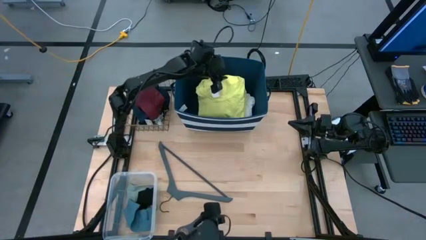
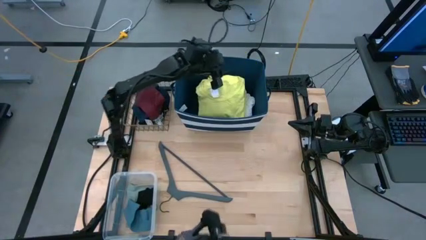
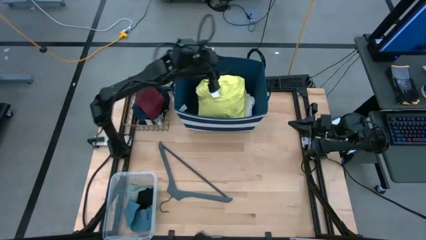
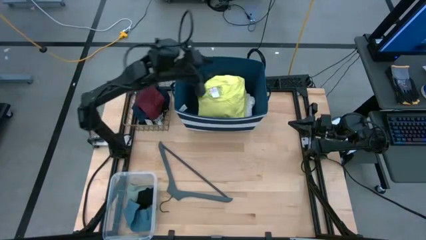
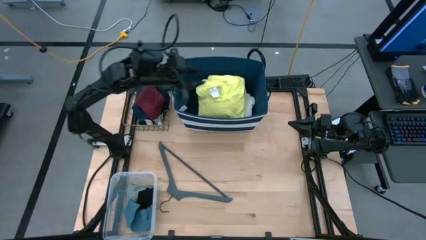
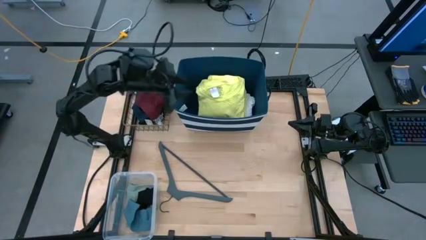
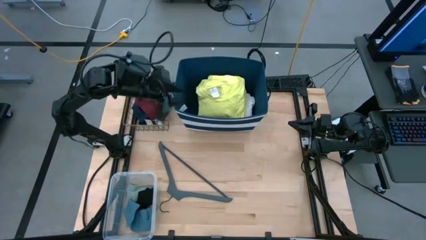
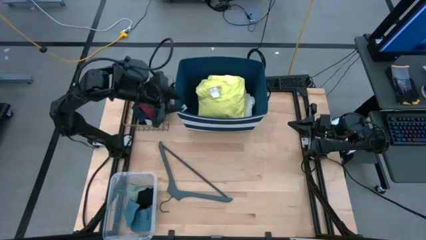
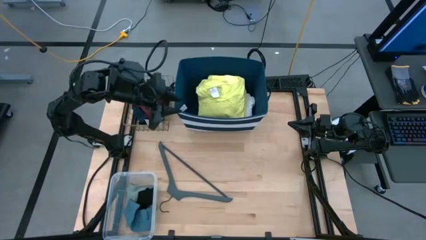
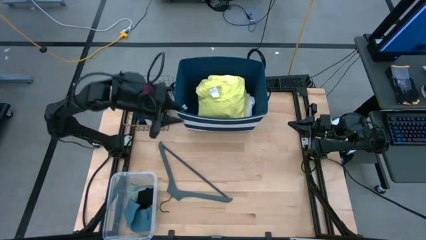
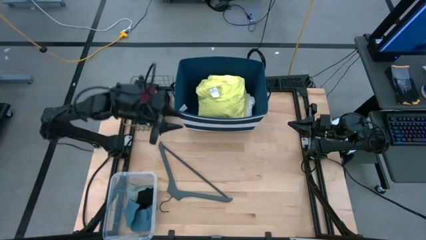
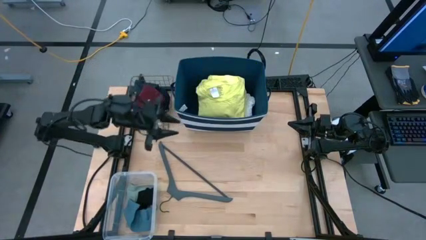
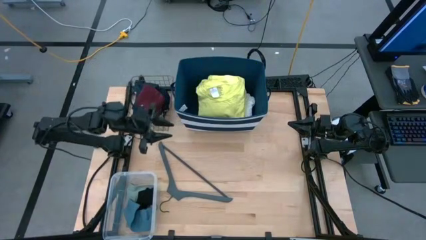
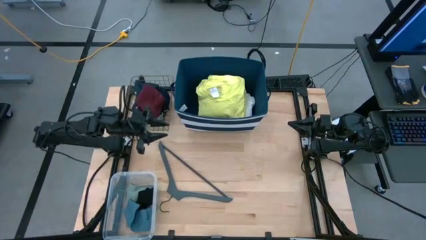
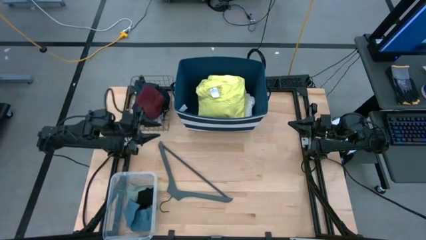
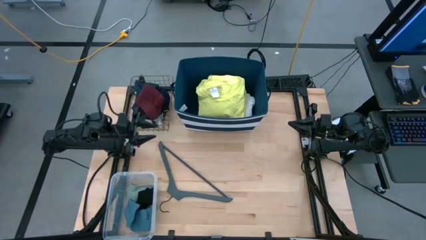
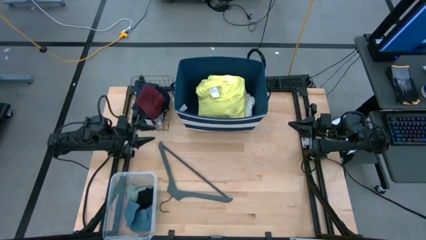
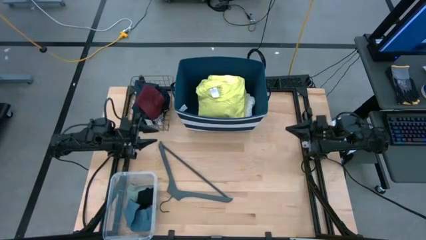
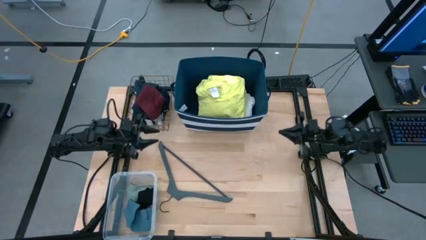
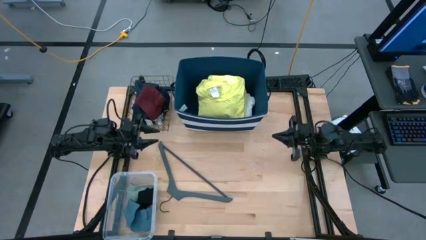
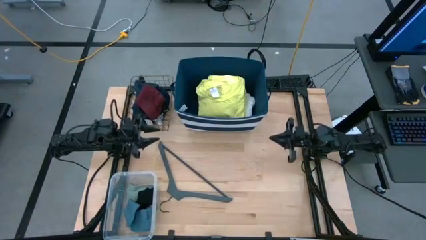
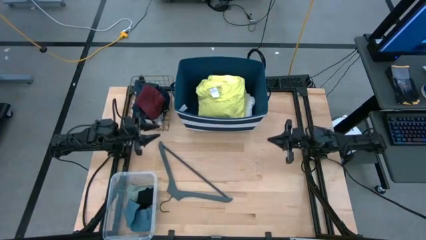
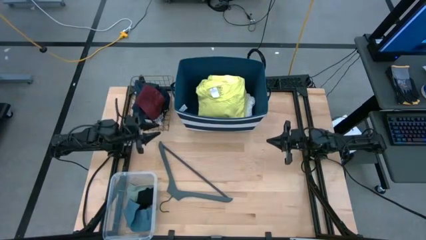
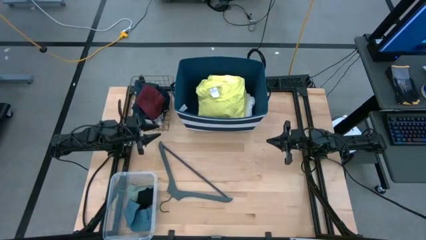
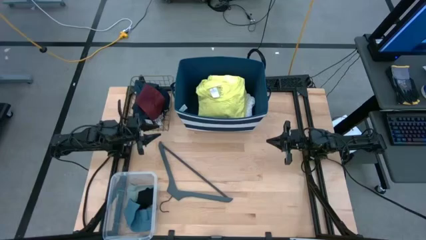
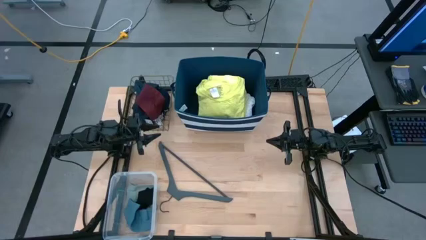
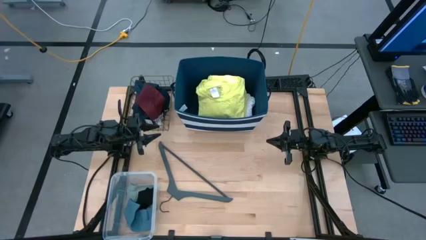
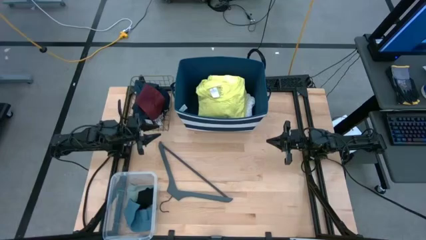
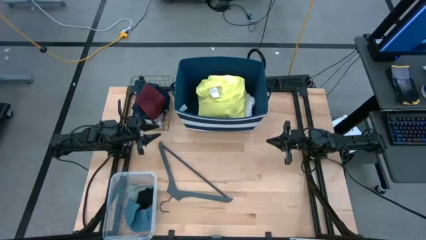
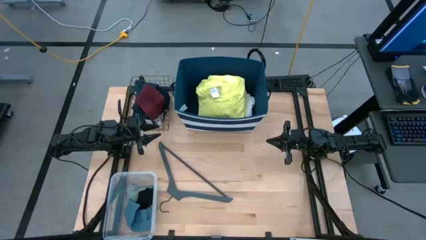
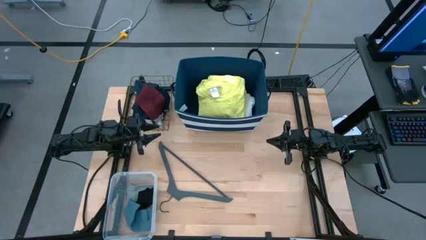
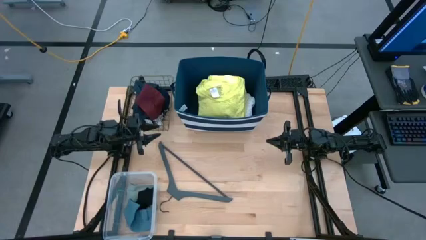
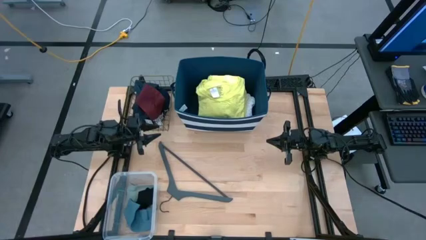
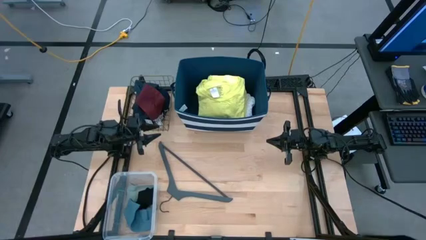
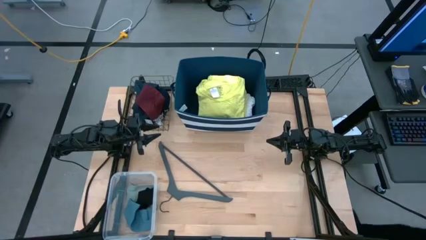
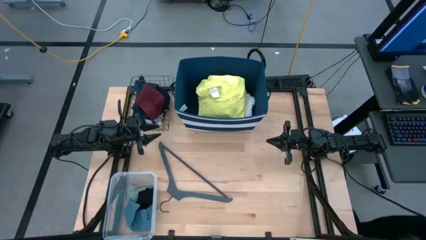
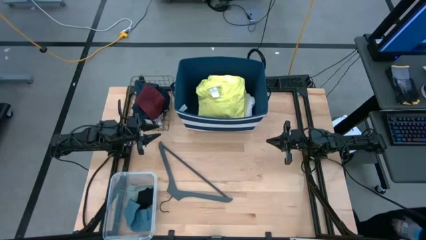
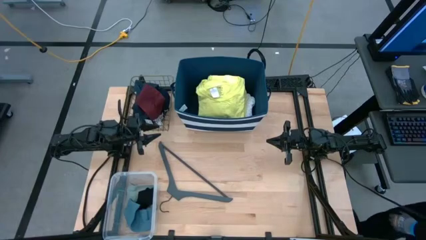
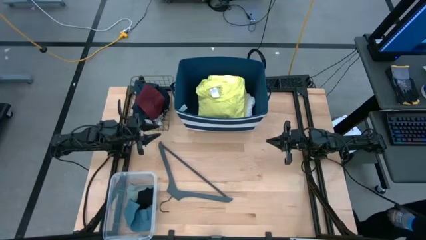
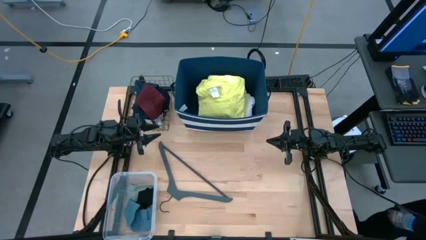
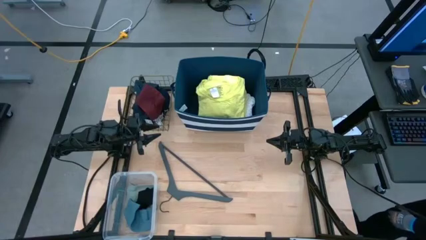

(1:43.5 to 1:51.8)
Task: Pick & Place Cloths
Return to Home Position

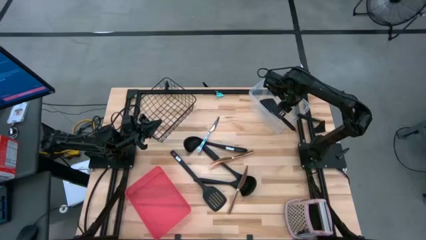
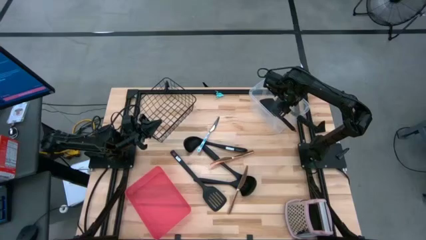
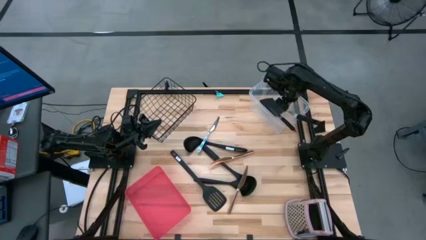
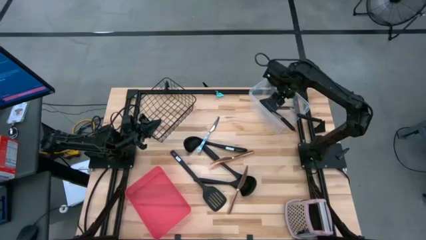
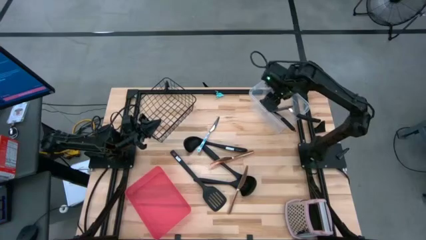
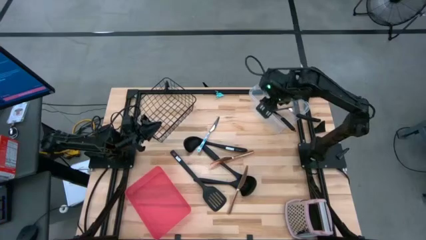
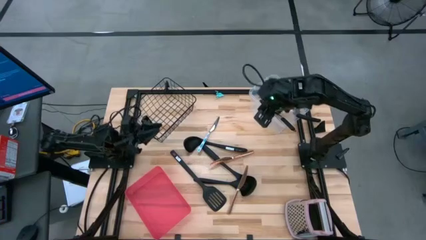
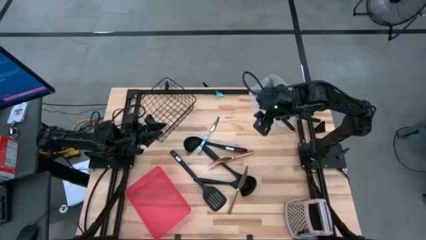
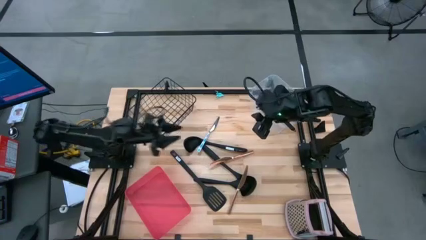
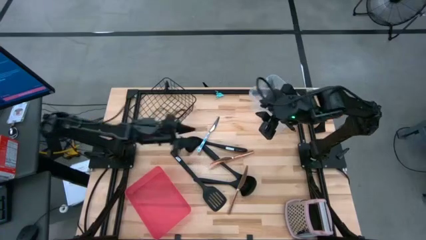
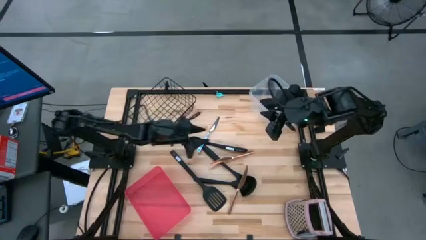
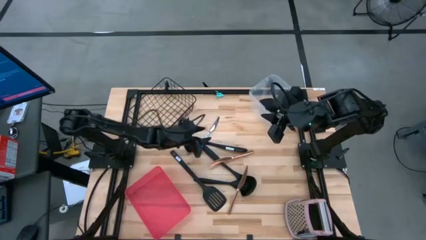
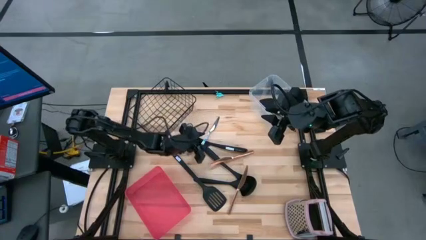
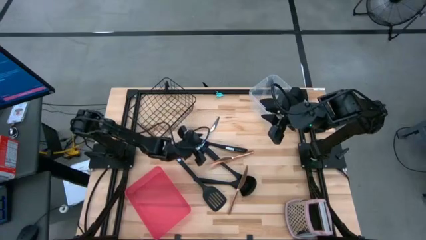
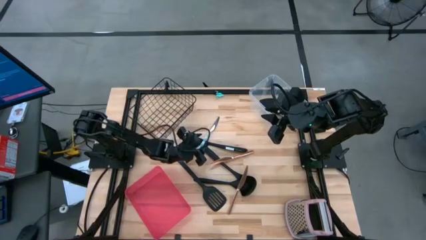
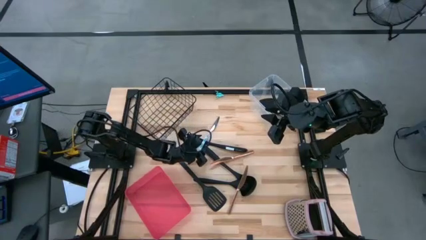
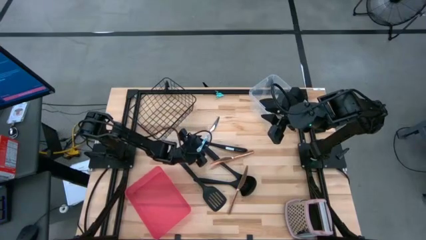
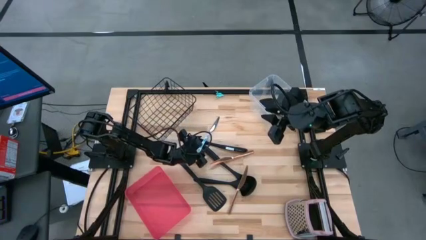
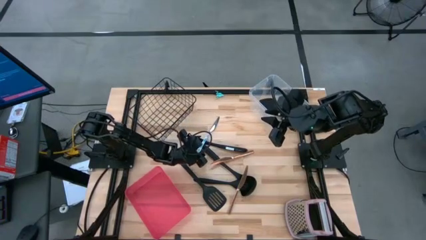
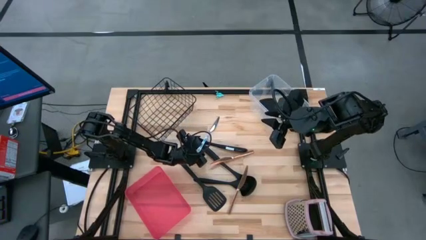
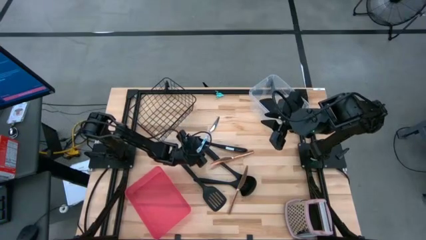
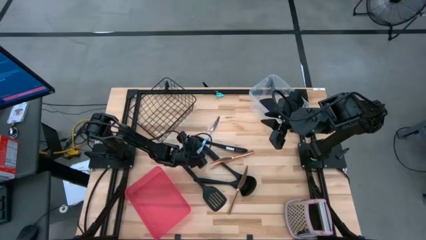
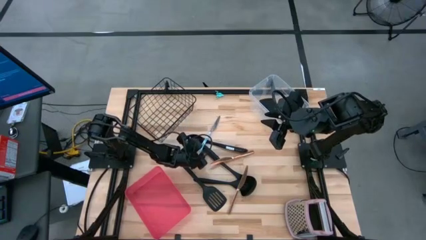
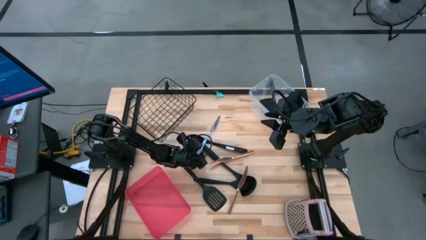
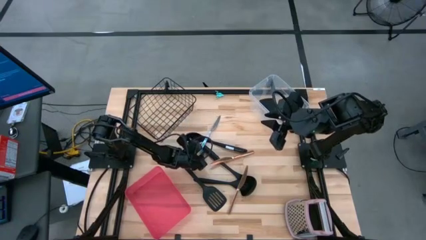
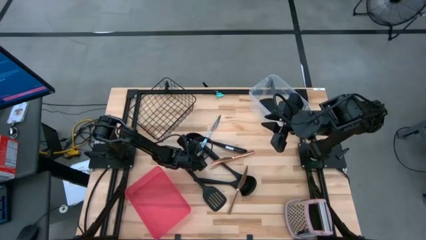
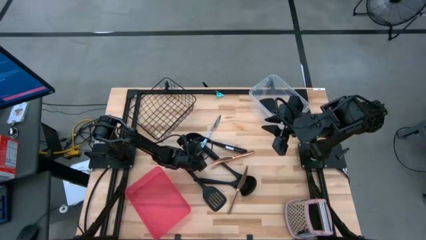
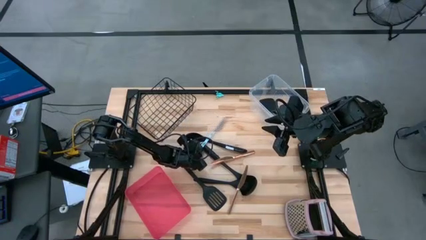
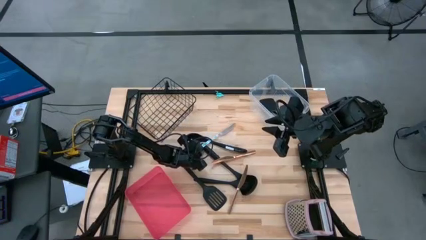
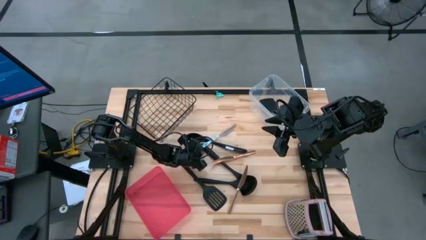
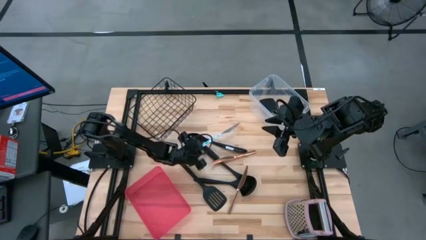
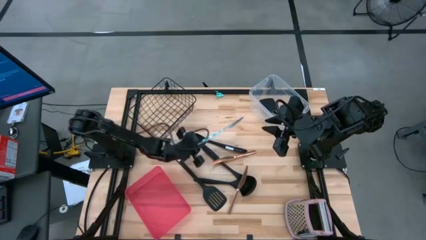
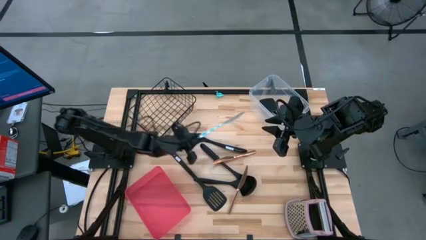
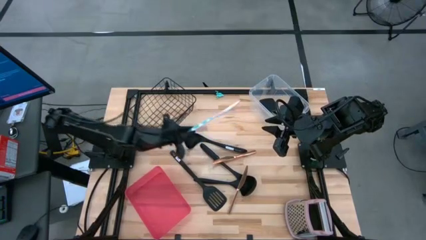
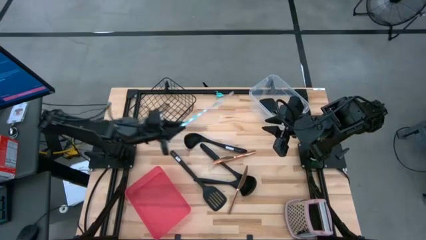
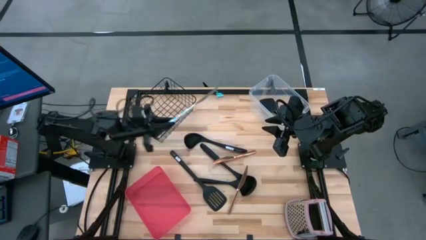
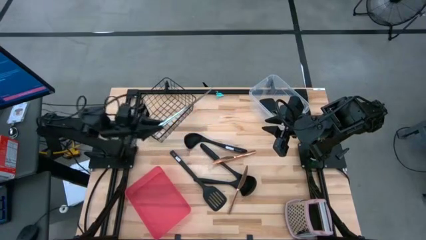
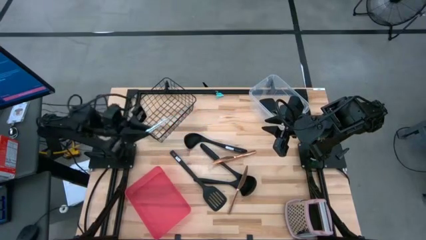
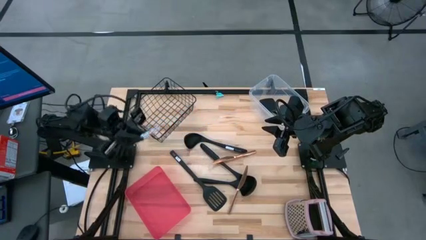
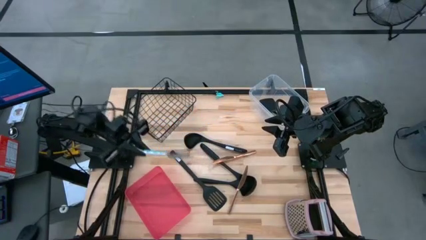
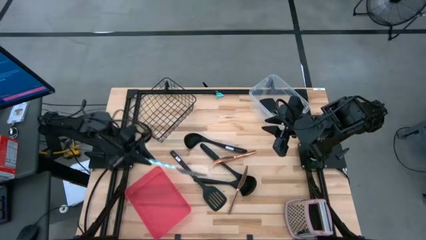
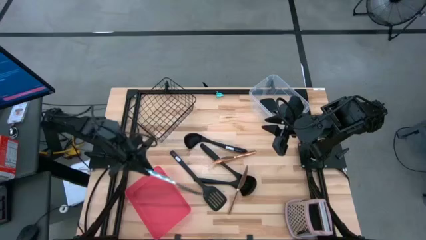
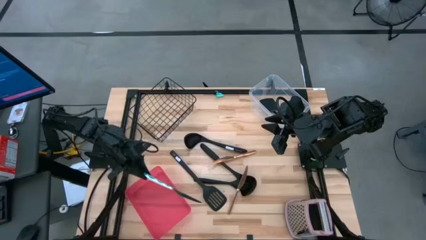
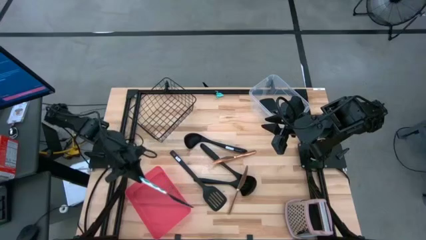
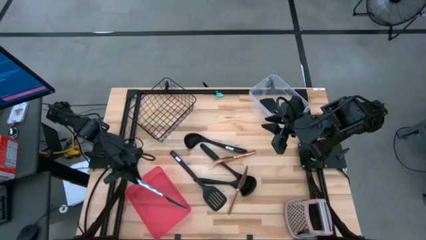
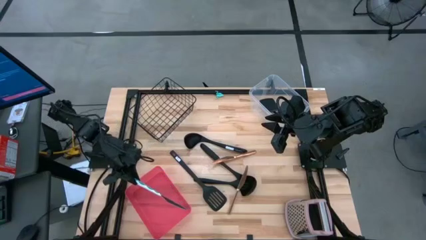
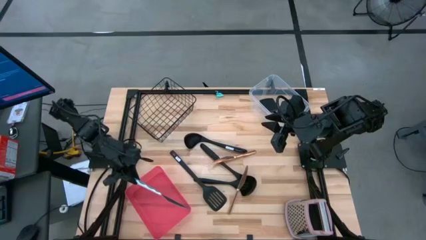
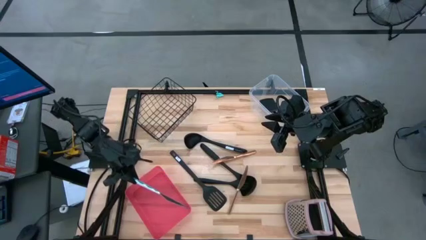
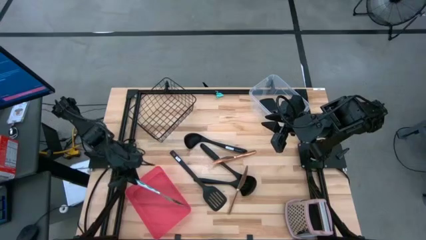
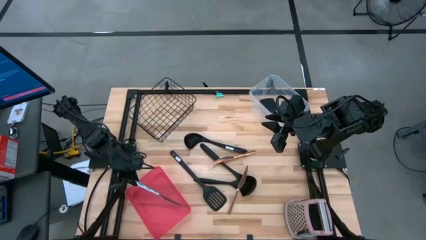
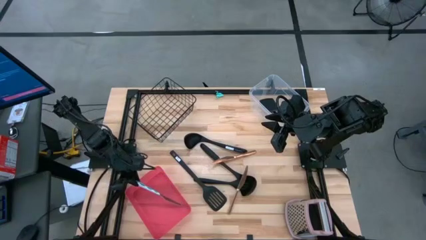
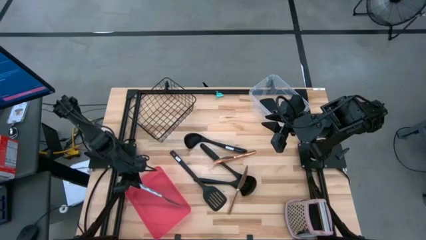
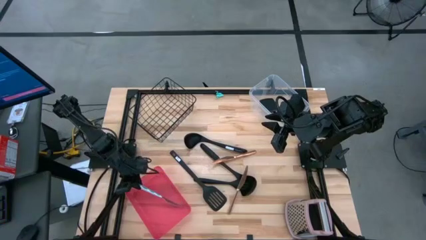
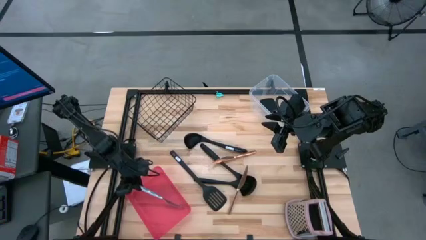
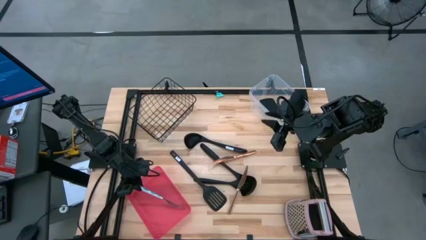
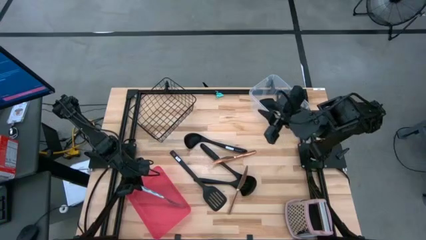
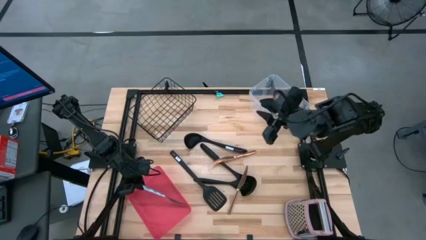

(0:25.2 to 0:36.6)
Task: Pick & Place Kitchen Items
Put the green knife into the red bin
